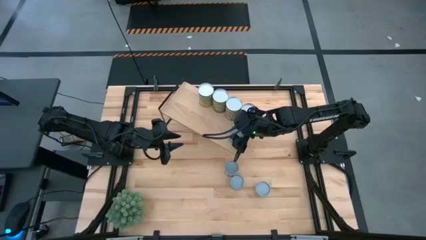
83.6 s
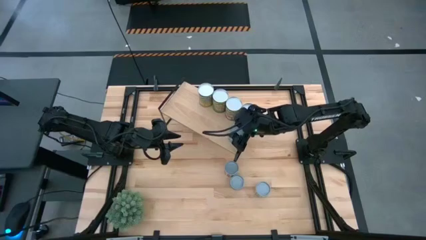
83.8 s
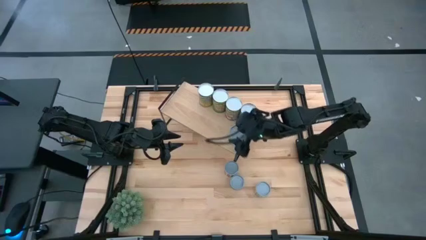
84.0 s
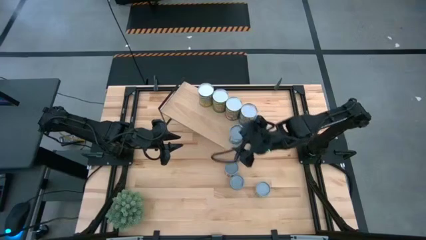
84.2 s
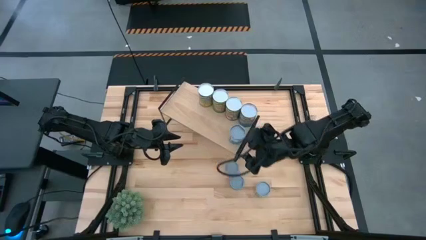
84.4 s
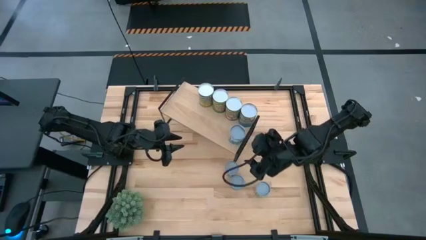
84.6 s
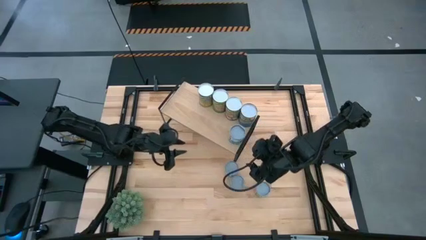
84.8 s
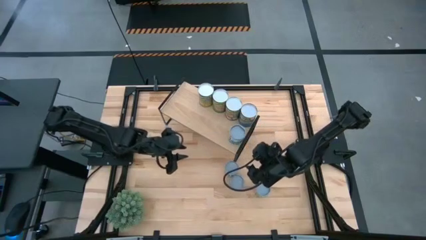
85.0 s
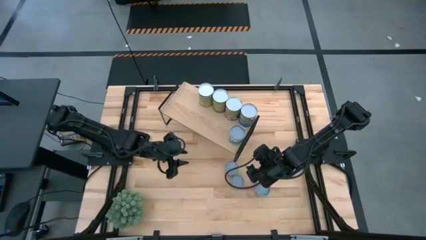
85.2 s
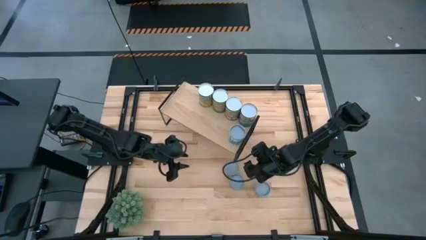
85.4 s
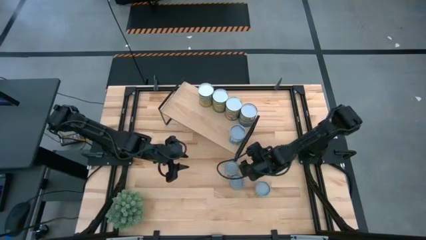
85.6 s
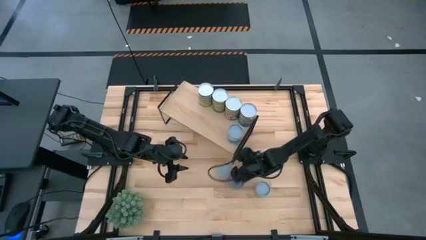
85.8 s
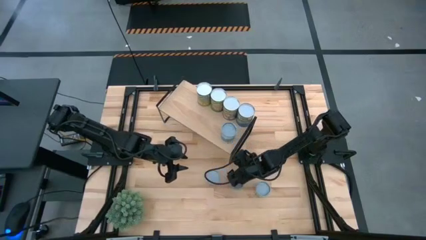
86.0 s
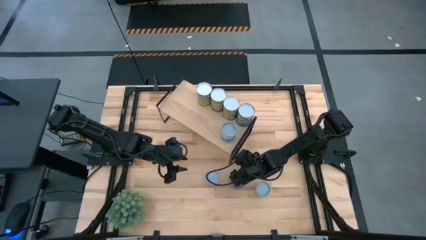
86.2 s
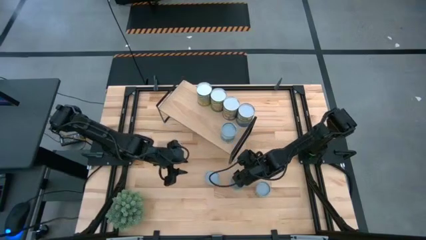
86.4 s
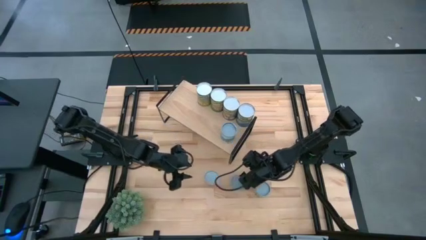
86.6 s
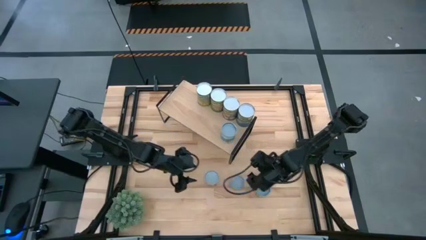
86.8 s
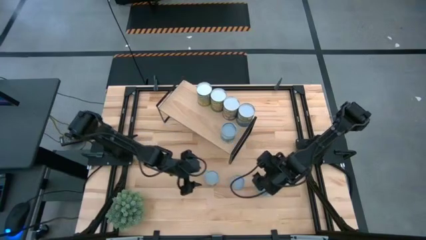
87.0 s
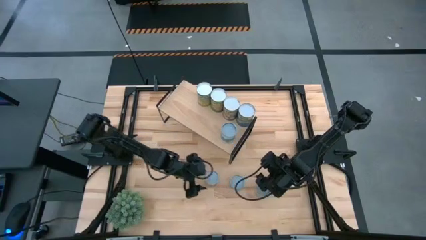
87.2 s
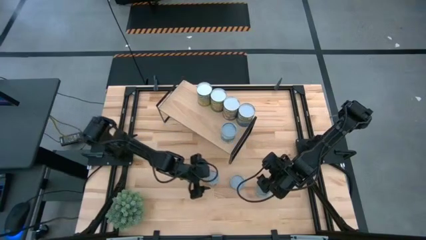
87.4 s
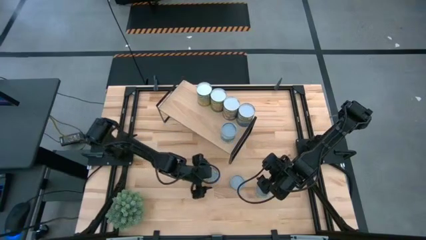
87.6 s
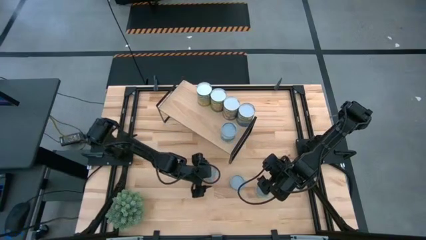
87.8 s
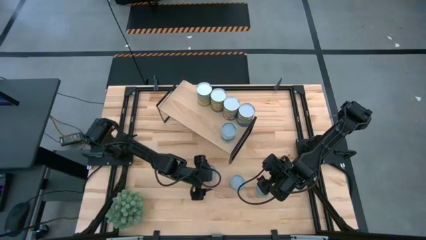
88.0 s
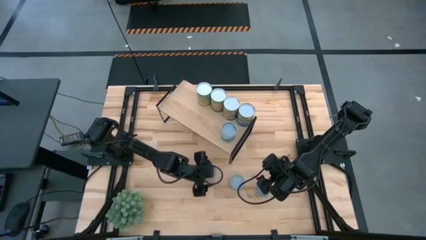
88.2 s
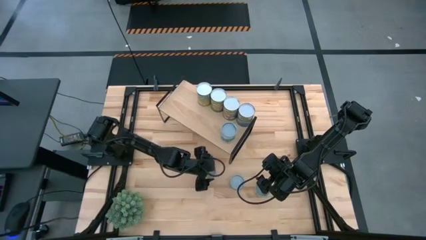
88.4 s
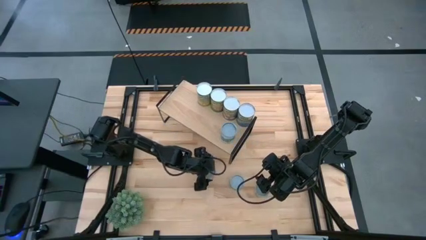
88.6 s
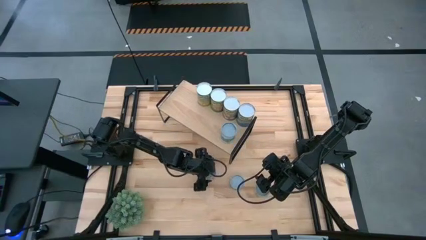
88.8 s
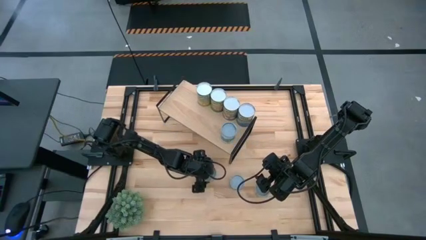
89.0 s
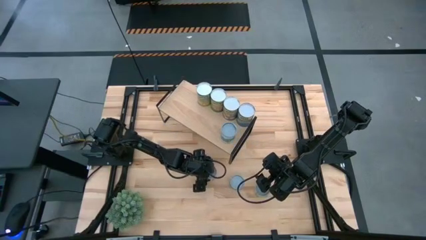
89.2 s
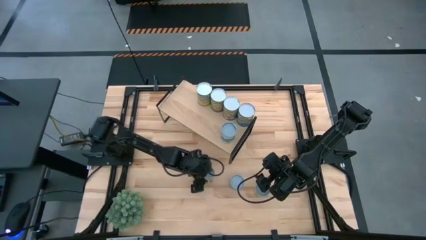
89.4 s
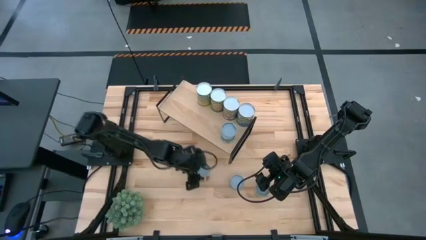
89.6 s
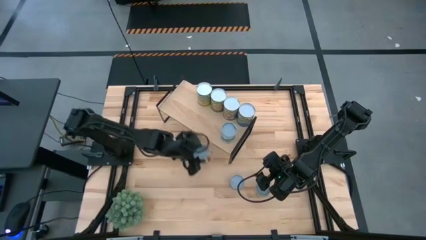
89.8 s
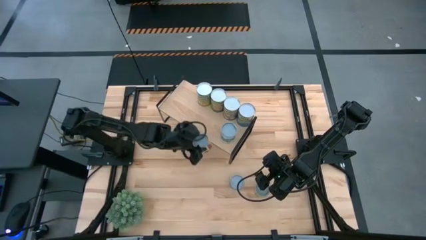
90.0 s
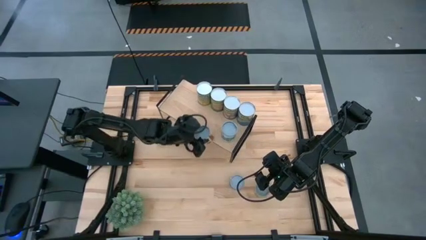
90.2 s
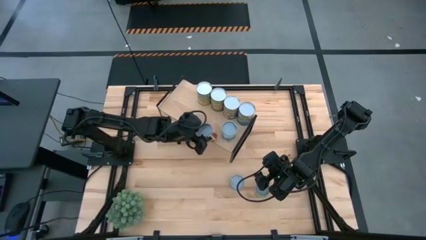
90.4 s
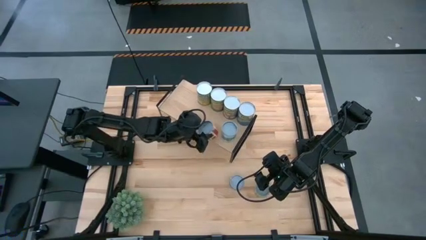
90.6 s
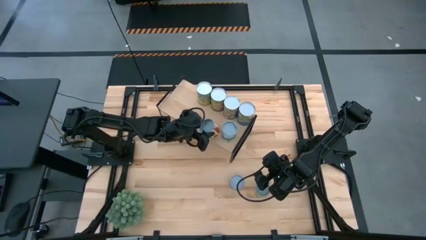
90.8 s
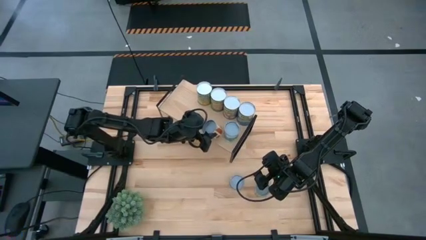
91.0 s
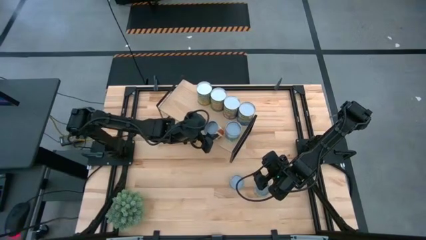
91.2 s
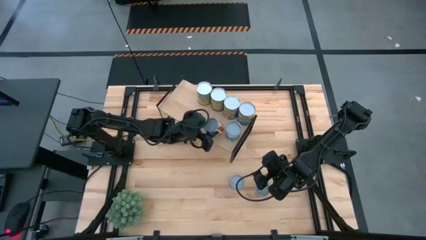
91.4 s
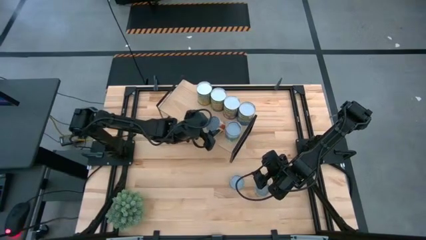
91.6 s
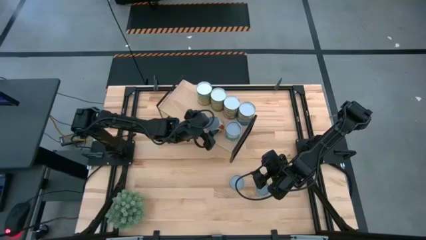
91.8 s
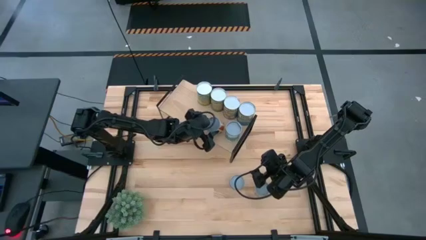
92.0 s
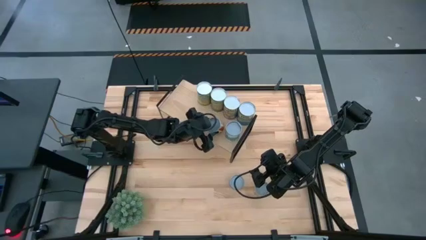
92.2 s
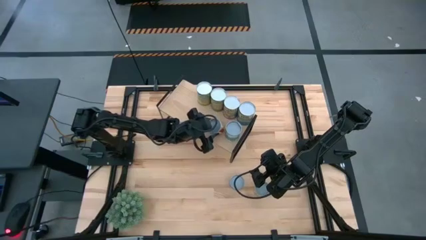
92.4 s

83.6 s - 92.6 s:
Task: Pick and place cans onto a shelf
Put the canned tomatoes on the shelf

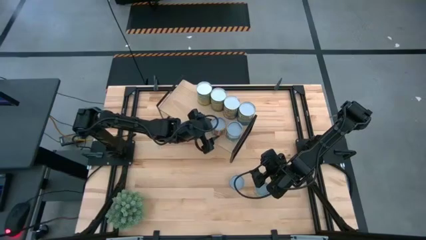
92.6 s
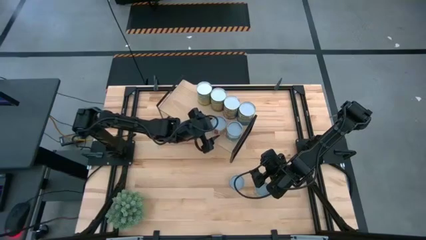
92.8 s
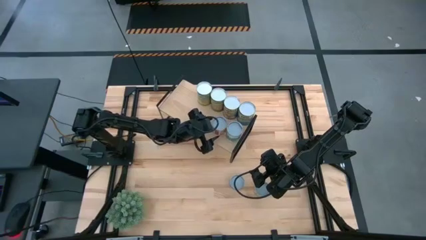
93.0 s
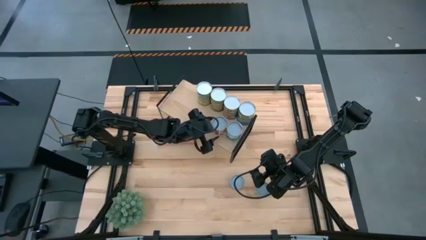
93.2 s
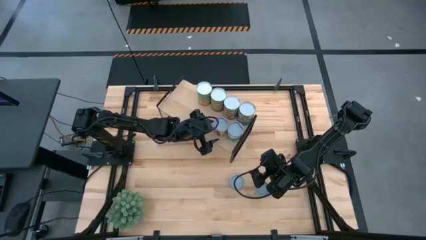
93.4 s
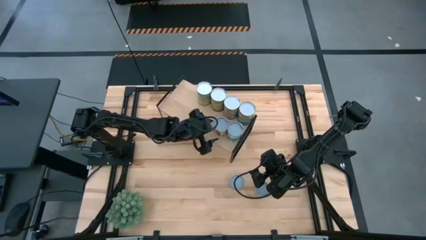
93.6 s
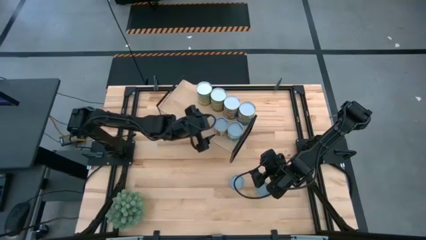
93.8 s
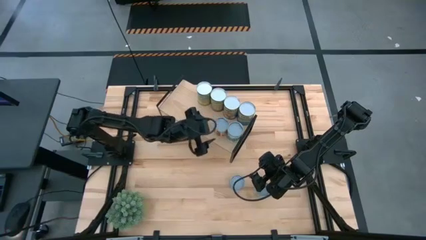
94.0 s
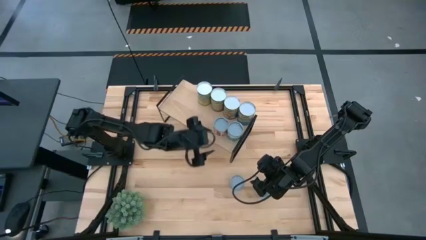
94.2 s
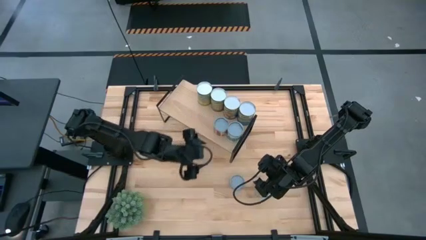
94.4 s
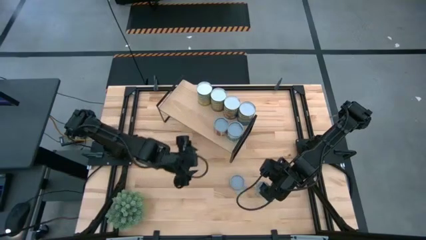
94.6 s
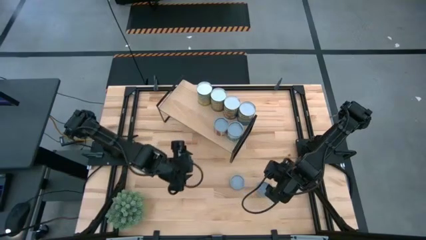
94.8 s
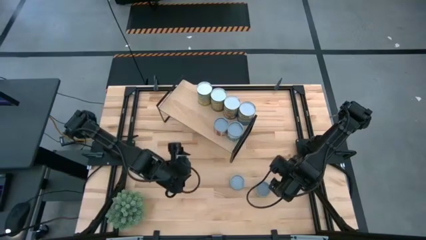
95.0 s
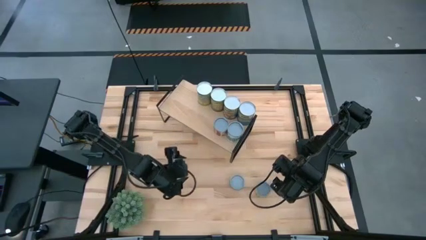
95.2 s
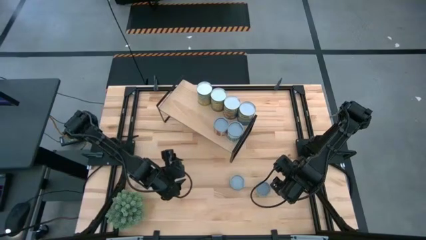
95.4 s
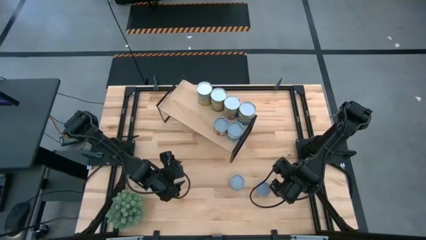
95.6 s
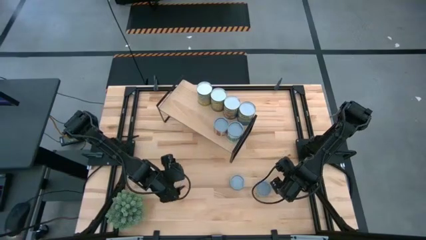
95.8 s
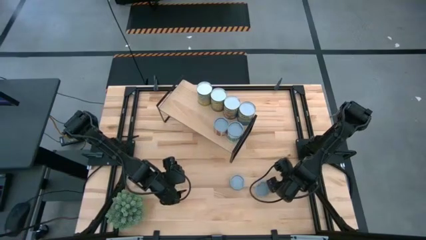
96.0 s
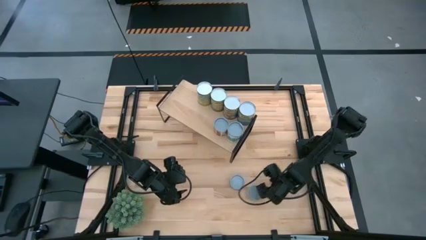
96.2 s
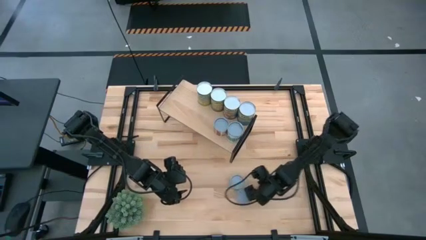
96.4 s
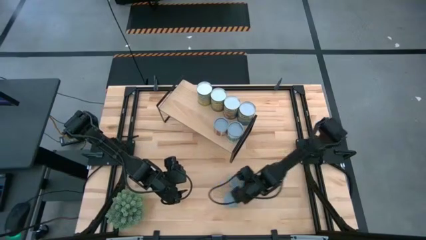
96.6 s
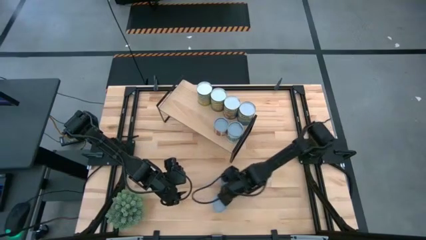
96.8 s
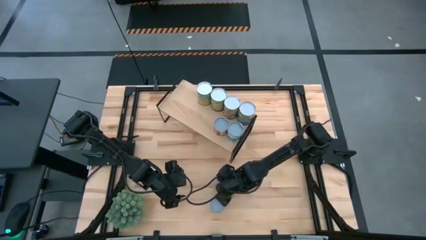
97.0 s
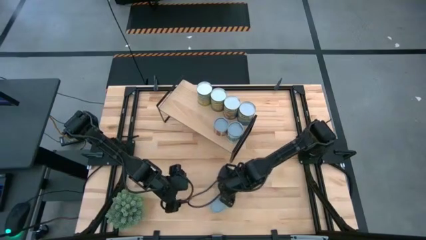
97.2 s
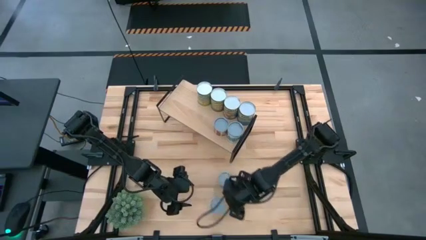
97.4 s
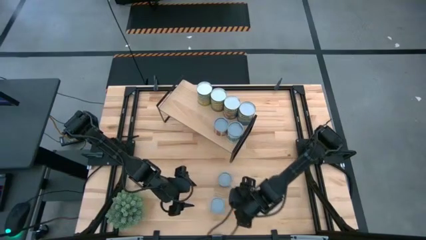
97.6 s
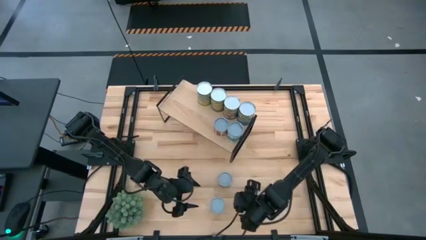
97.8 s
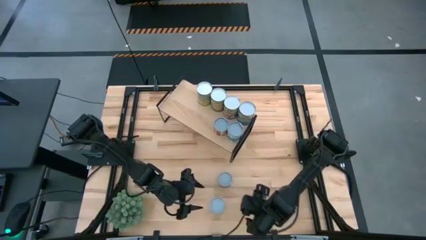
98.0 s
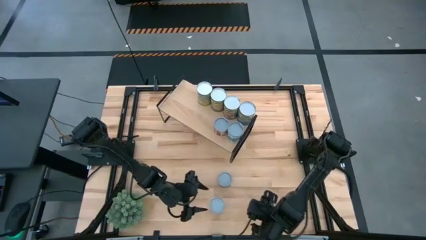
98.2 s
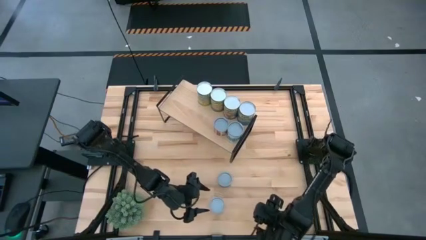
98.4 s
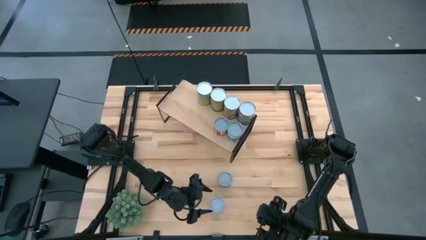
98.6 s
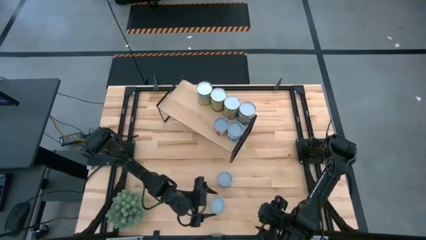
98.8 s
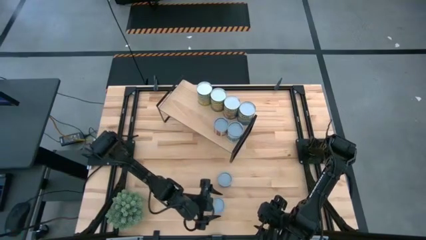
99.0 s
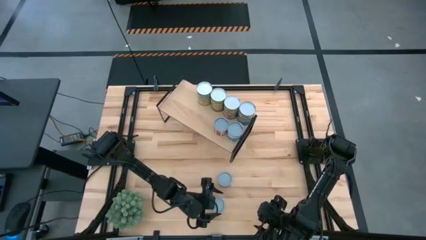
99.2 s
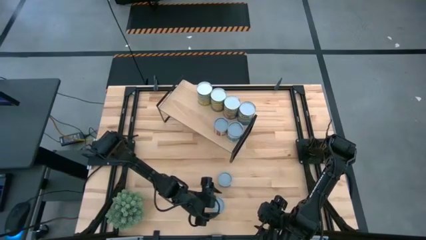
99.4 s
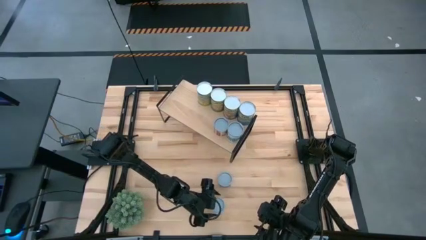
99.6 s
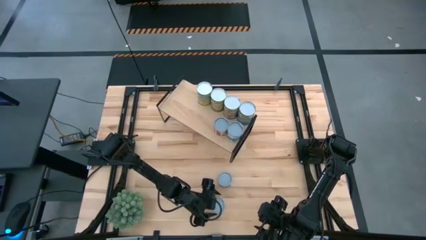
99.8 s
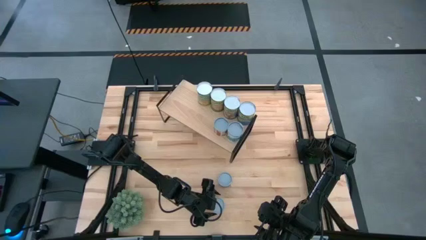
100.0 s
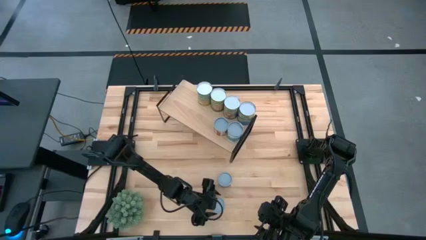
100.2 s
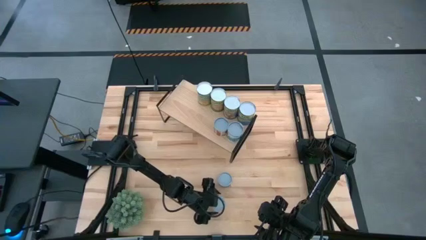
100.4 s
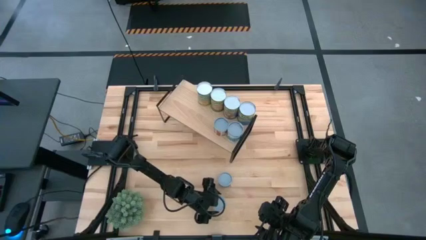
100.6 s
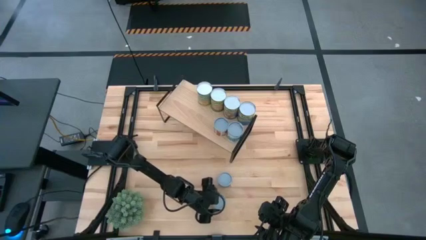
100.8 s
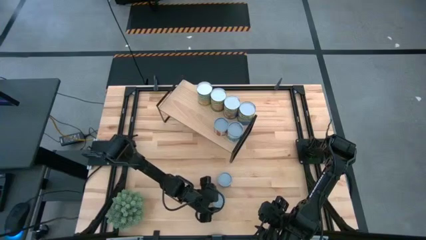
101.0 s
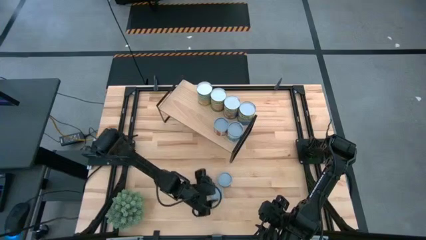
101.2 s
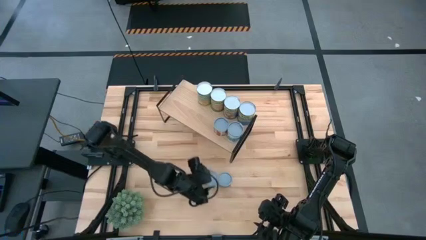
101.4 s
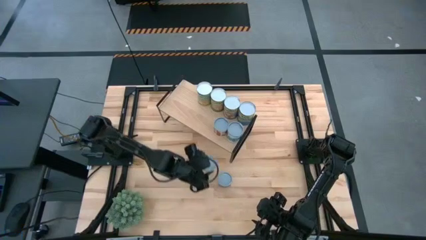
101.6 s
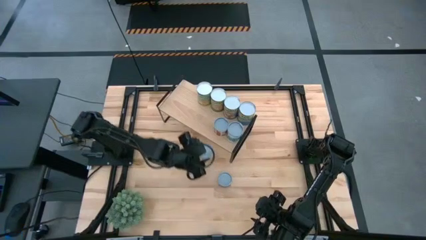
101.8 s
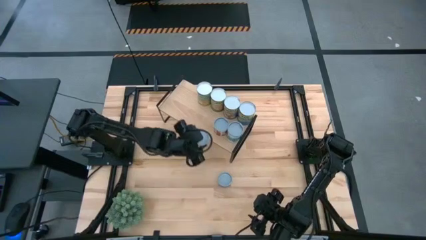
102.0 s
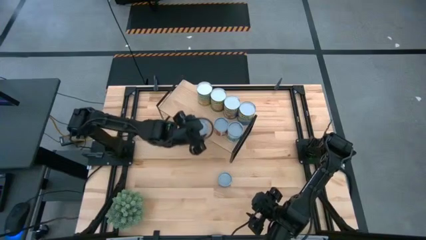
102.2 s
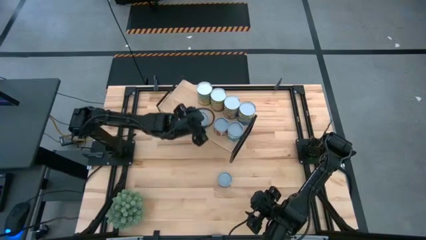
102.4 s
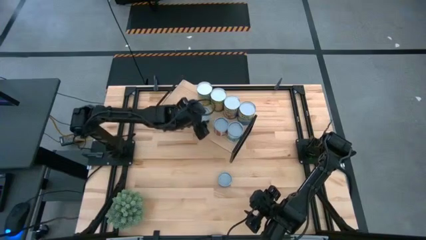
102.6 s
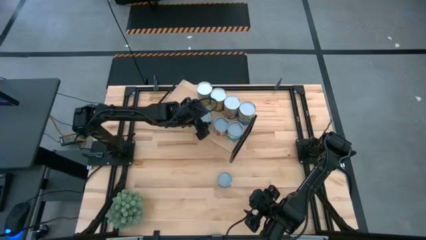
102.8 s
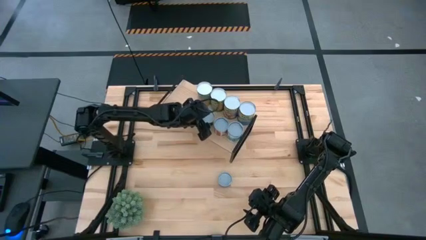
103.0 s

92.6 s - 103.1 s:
Put the small canned peas on the shelf
